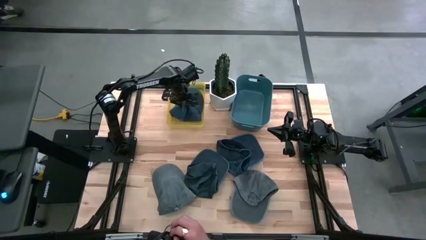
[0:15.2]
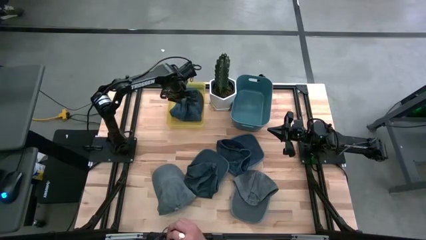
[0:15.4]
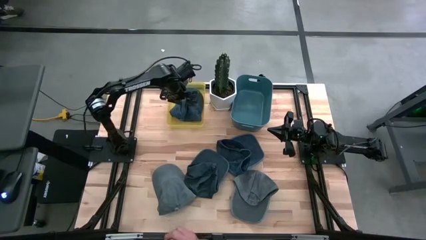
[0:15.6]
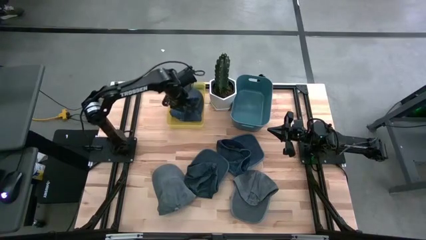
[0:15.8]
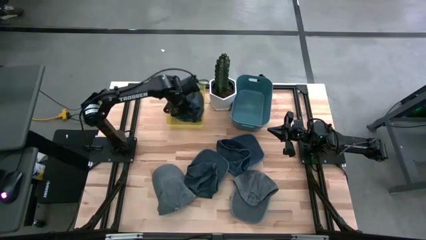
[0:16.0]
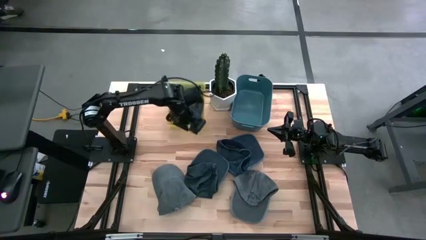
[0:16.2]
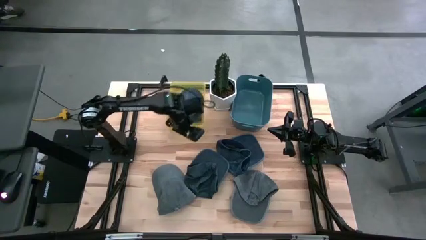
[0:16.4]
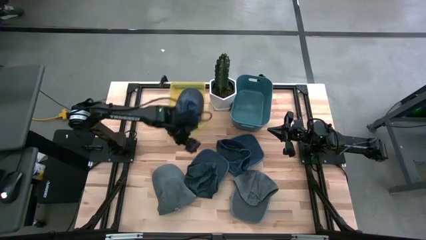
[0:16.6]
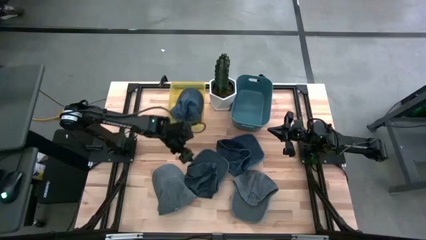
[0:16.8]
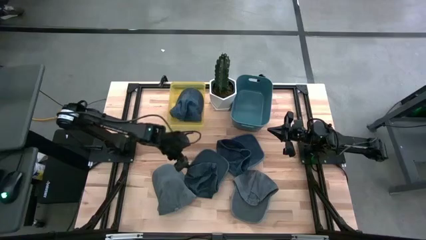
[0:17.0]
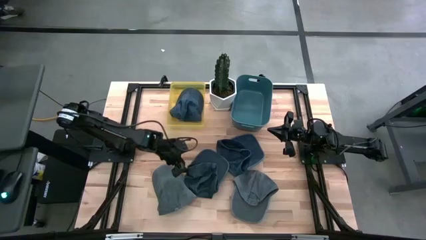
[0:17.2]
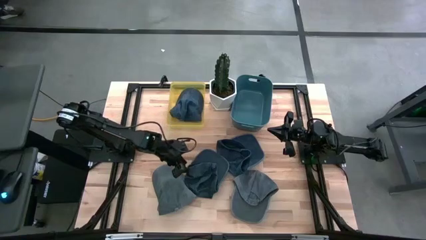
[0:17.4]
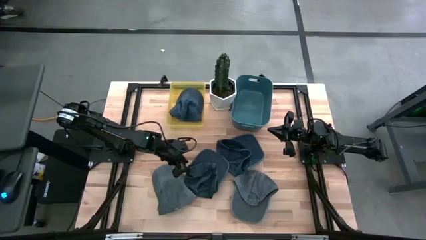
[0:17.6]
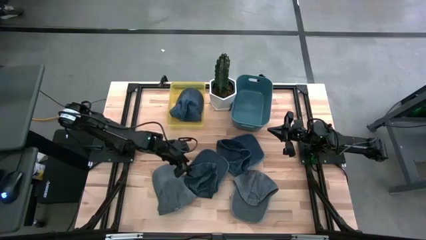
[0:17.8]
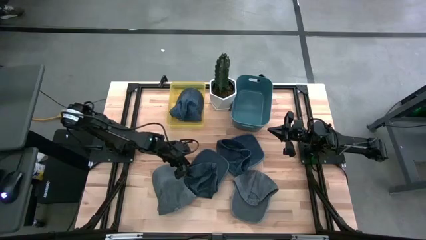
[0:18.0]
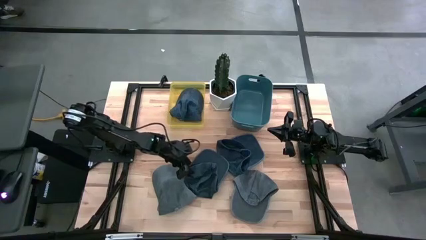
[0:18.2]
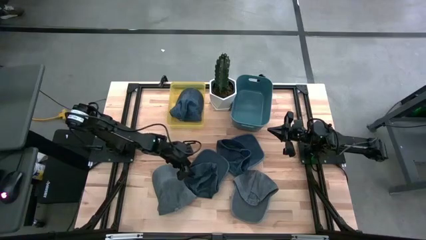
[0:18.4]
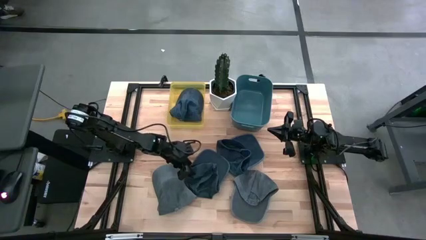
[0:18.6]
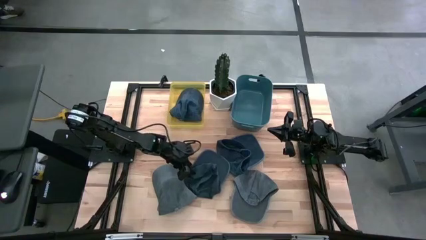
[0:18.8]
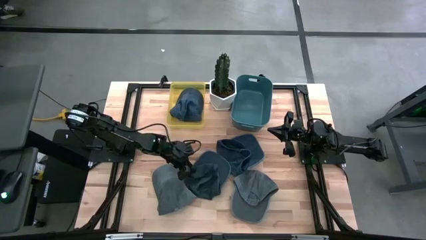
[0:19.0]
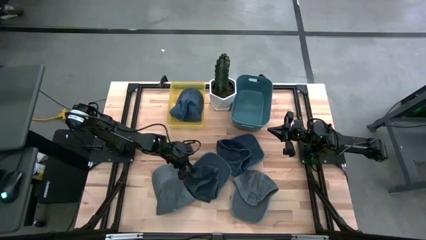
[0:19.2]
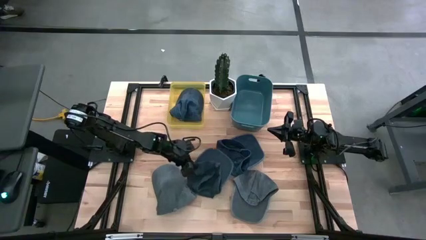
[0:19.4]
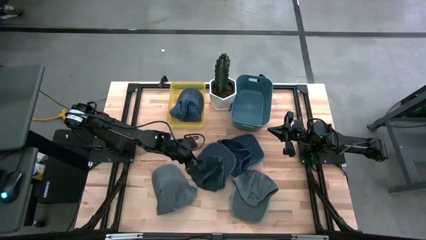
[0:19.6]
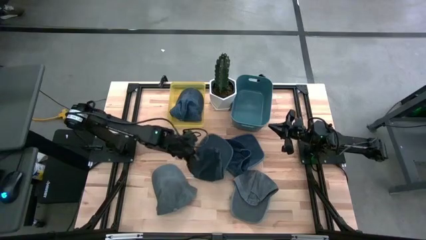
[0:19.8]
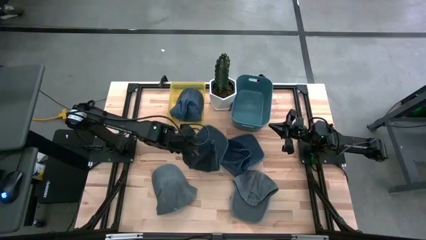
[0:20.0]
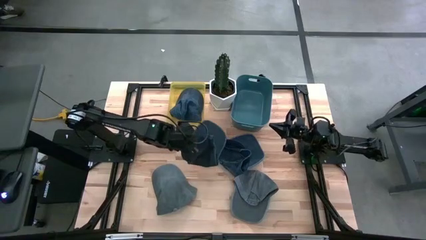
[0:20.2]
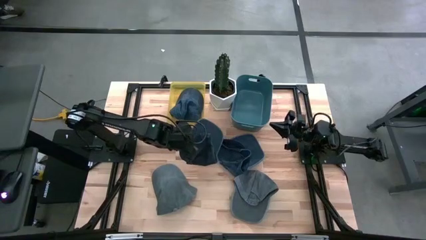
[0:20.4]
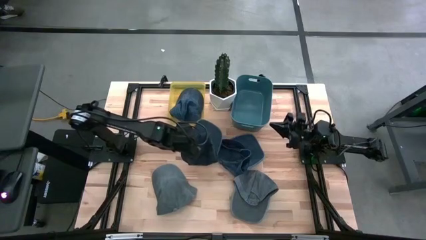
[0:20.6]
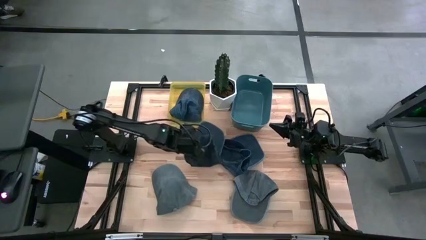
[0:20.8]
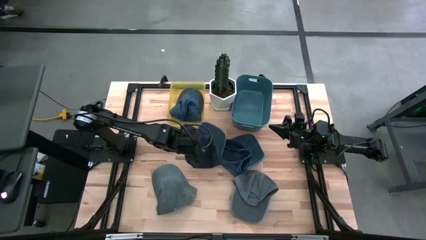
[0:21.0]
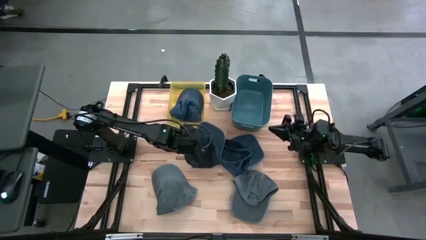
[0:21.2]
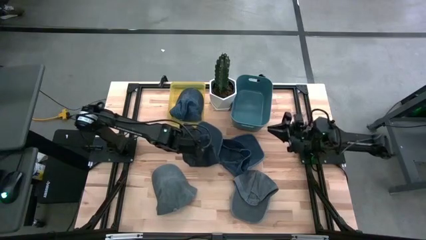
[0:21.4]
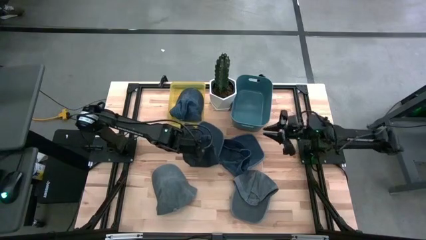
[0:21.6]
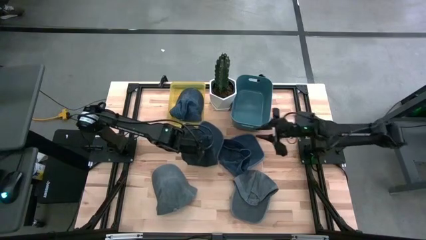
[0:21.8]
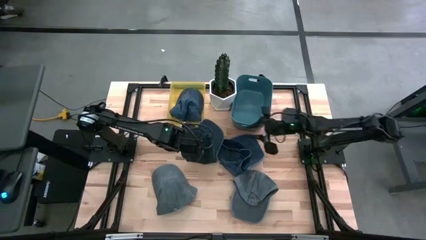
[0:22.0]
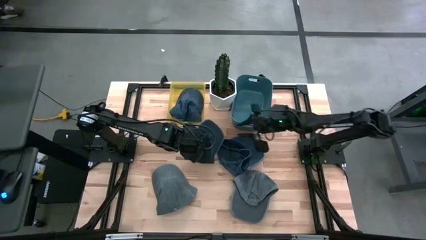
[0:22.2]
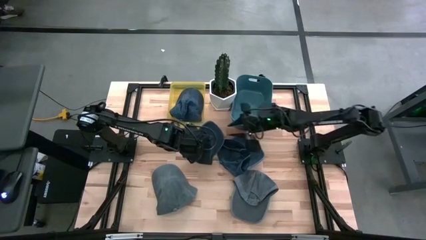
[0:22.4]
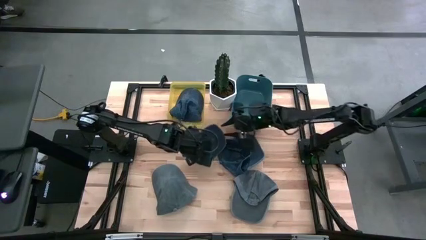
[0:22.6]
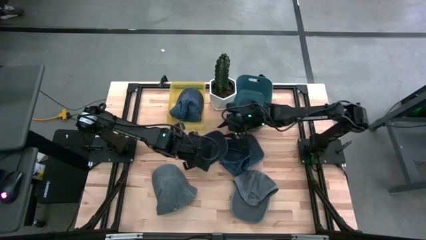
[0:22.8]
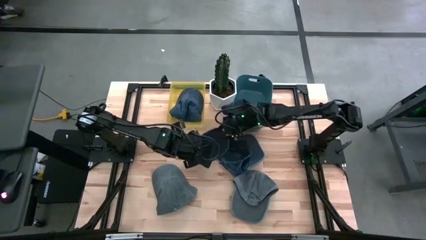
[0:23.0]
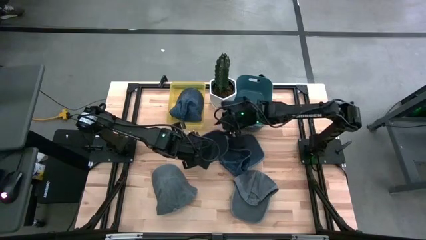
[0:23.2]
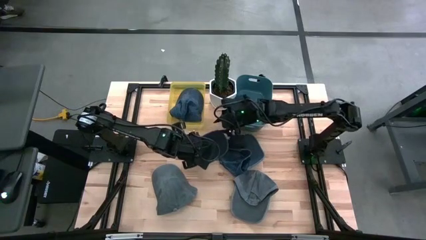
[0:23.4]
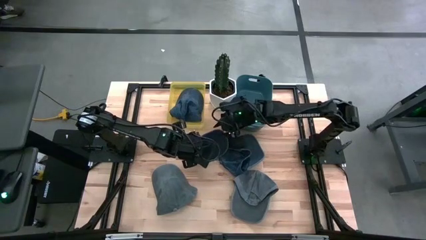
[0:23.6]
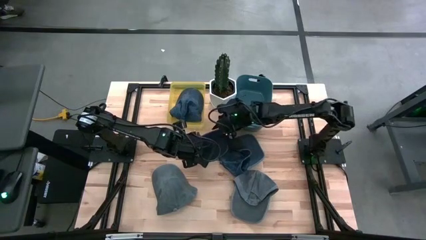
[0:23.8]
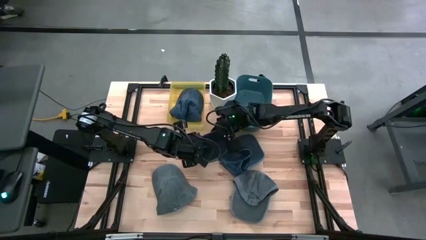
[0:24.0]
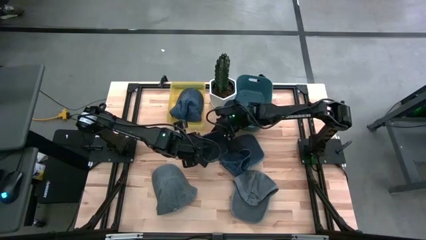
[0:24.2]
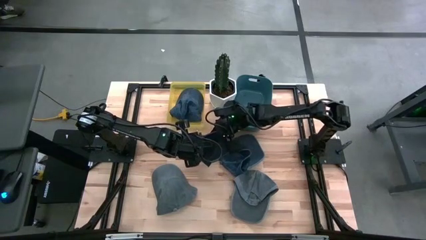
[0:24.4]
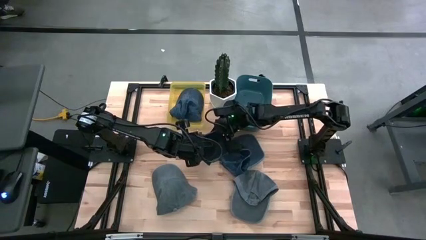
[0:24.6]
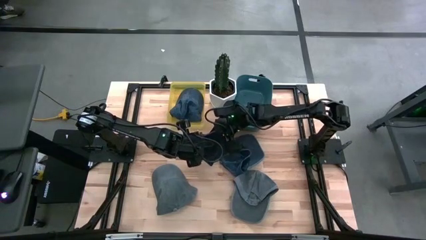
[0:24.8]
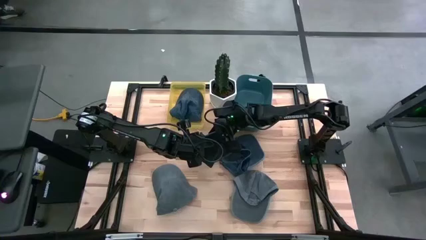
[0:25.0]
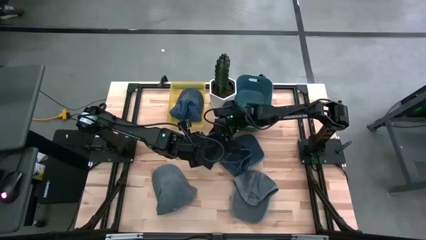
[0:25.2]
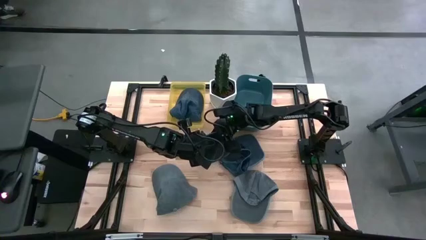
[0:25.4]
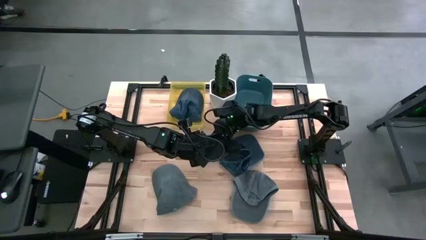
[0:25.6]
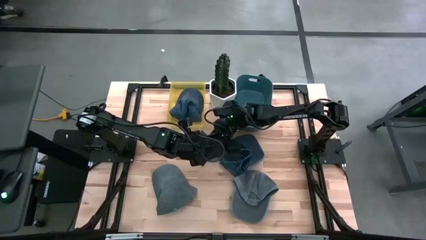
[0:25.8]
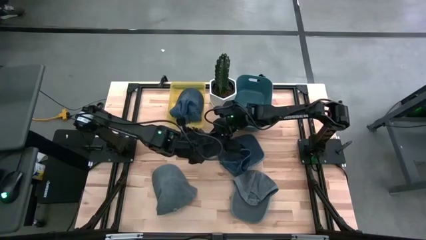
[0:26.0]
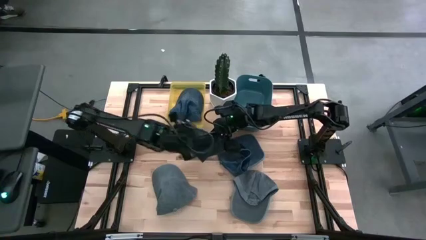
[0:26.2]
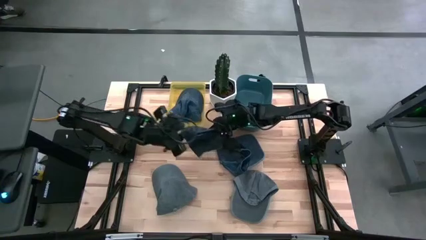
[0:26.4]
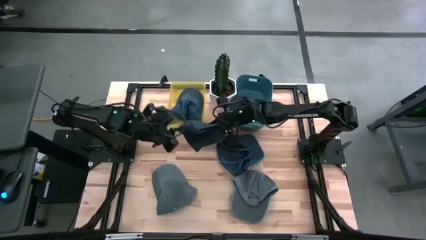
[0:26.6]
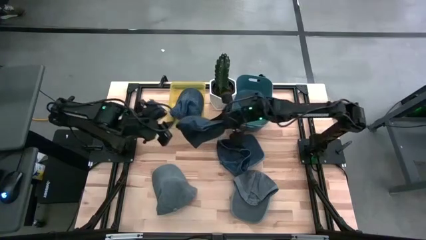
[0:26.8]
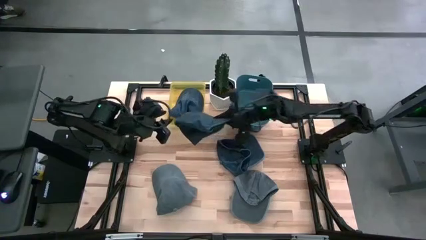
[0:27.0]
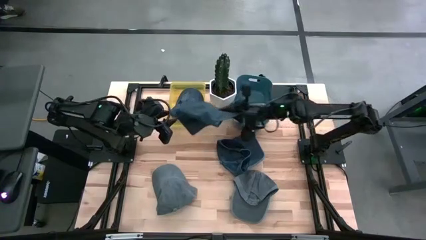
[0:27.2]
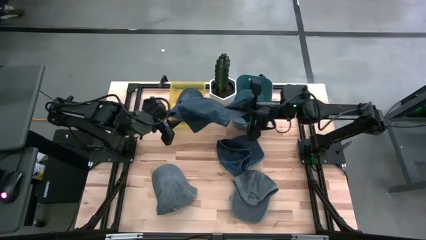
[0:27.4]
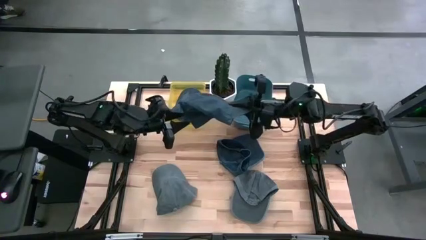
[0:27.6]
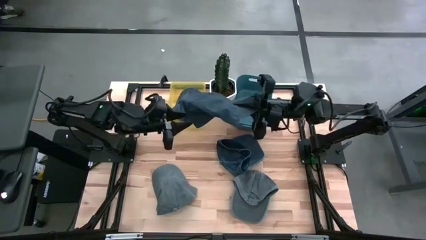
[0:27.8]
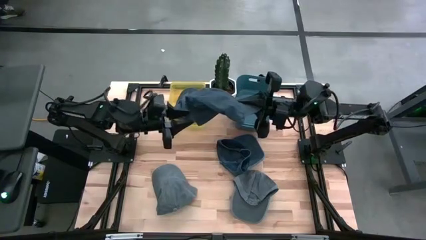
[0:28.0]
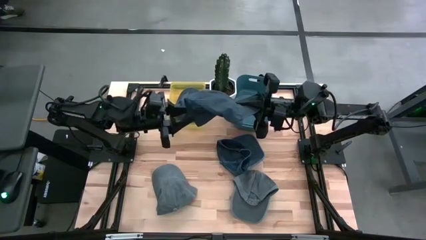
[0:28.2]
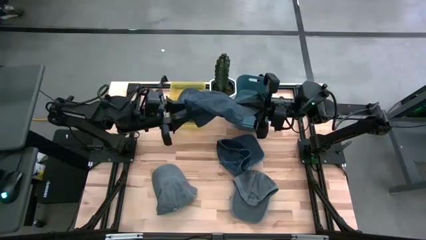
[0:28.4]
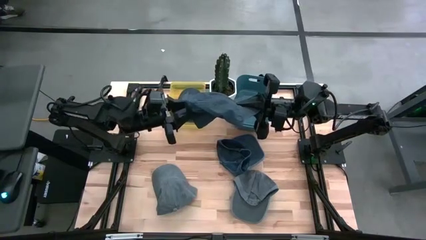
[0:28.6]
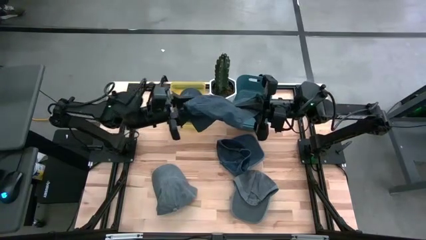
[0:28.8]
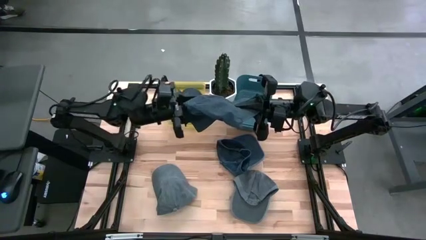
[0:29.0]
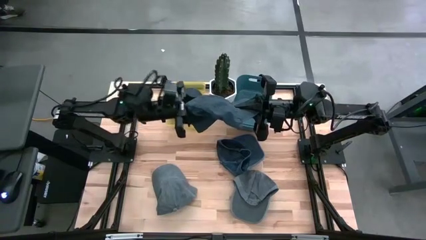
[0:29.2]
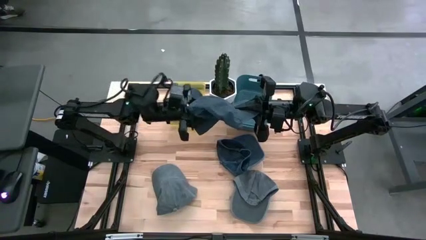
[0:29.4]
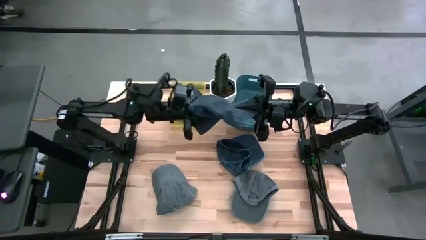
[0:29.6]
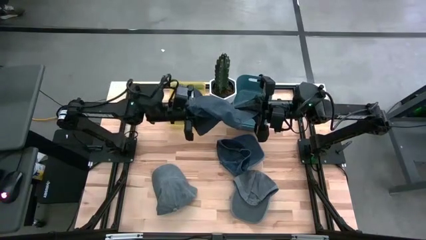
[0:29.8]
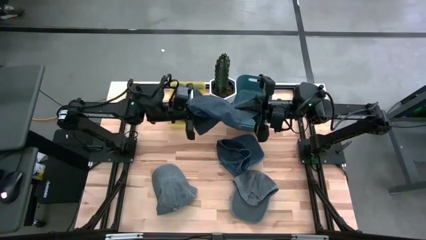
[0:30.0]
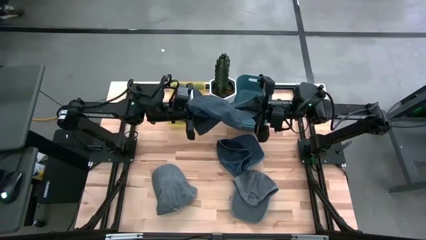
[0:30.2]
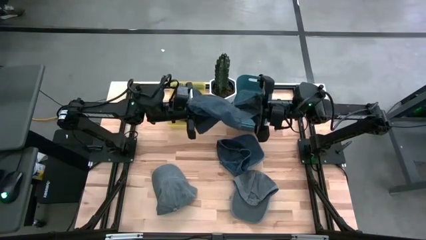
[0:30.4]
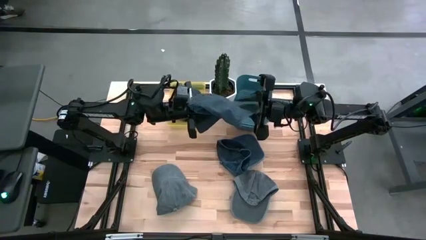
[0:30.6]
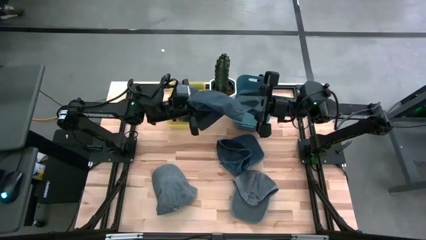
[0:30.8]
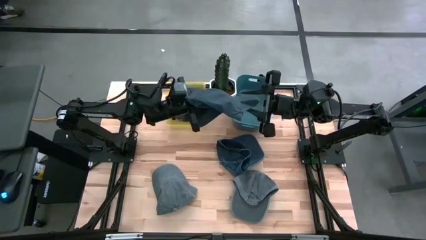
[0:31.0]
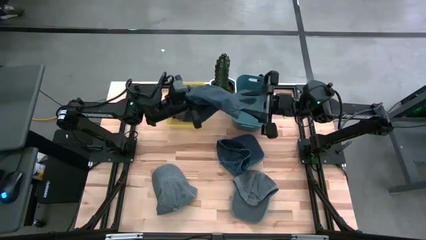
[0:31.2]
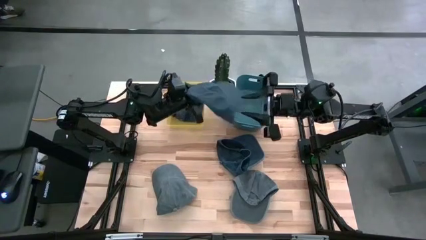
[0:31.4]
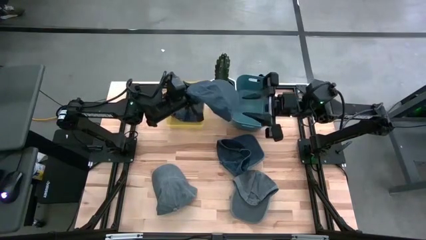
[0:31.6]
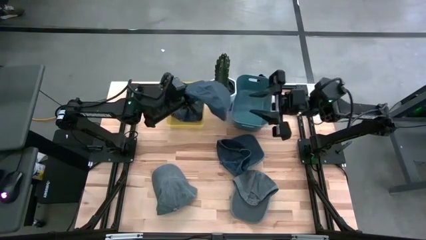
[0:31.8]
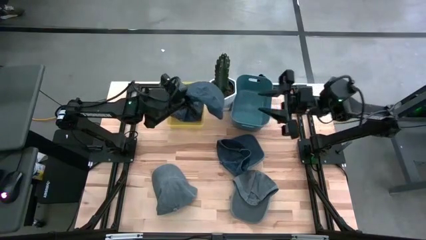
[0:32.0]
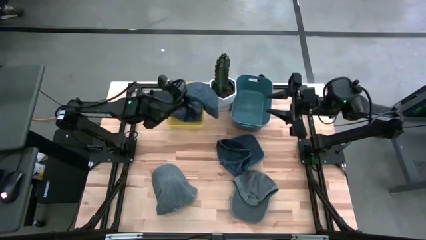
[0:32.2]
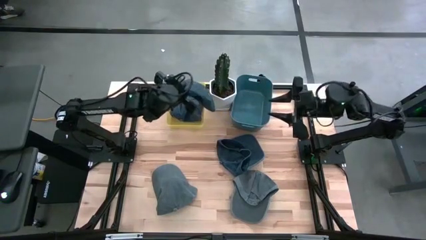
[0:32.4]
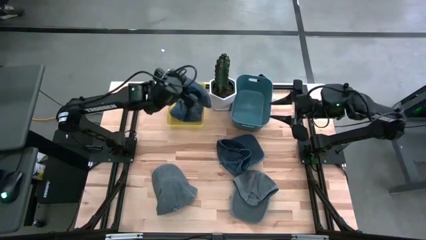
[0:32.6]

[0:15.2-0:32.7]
Task: Pick & Place hat
Put the left blue cap into the yellow bin
